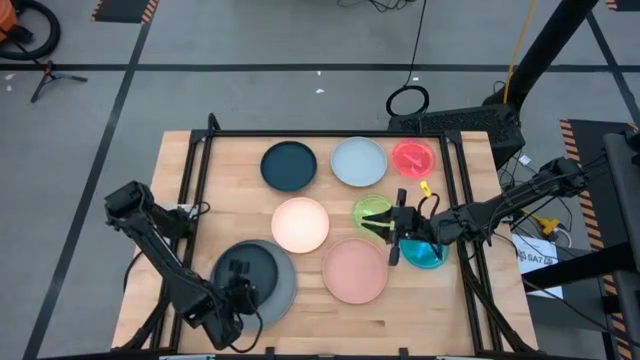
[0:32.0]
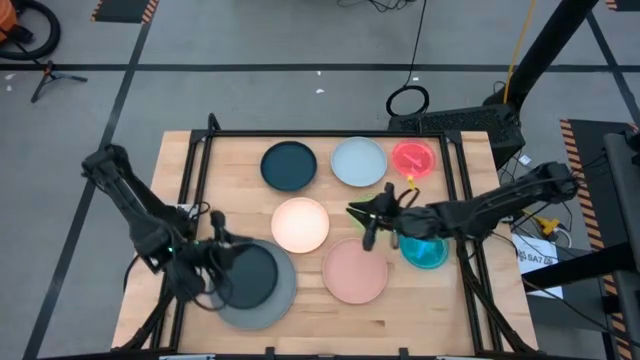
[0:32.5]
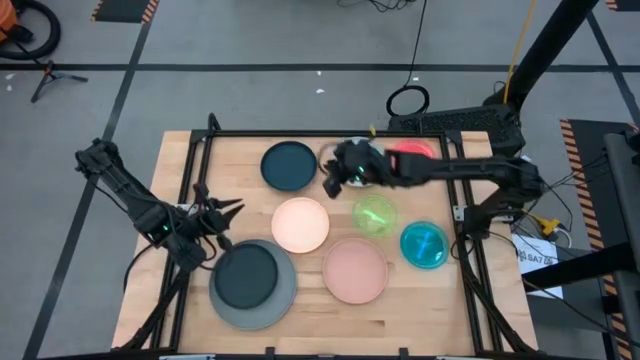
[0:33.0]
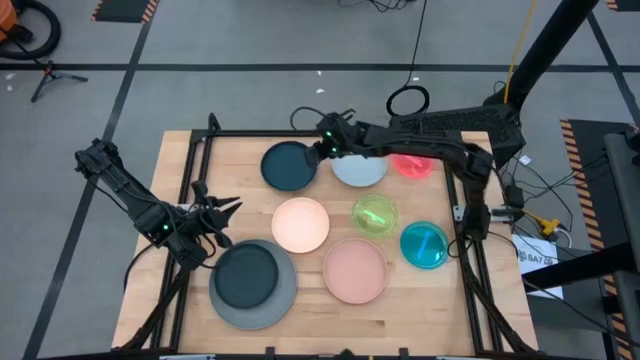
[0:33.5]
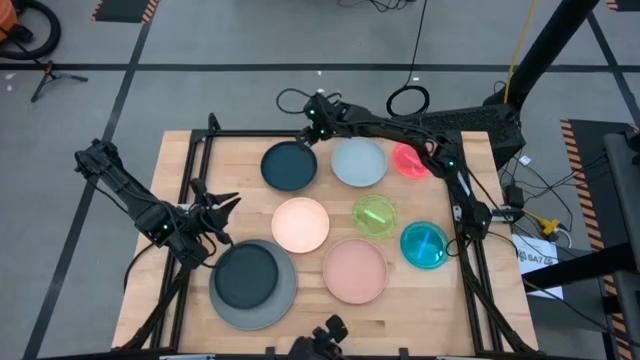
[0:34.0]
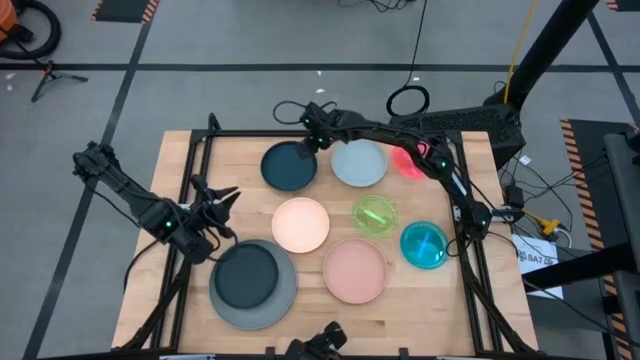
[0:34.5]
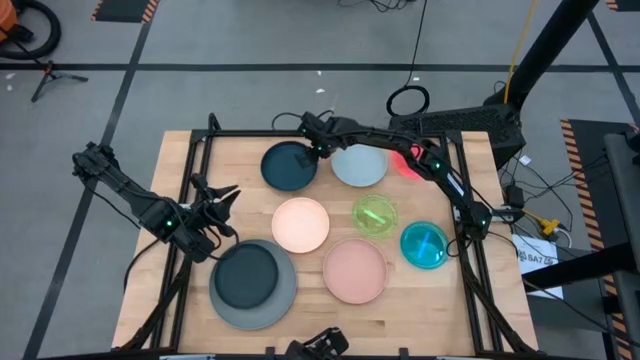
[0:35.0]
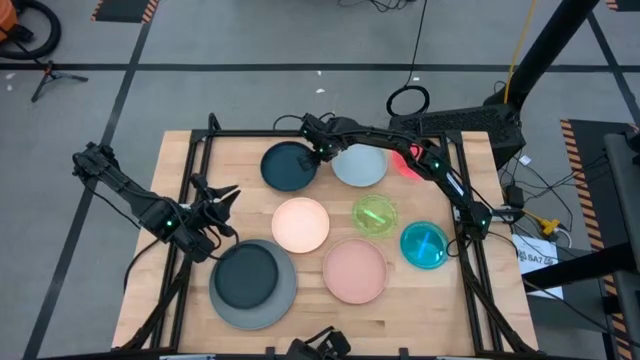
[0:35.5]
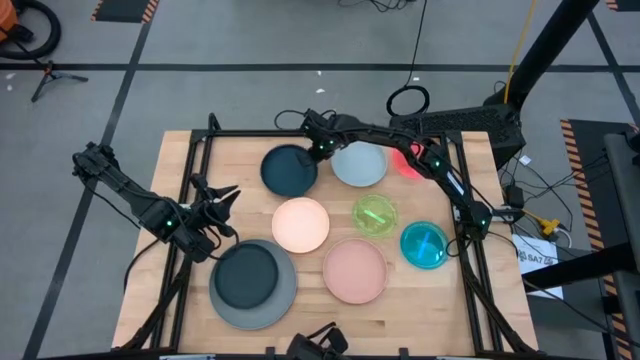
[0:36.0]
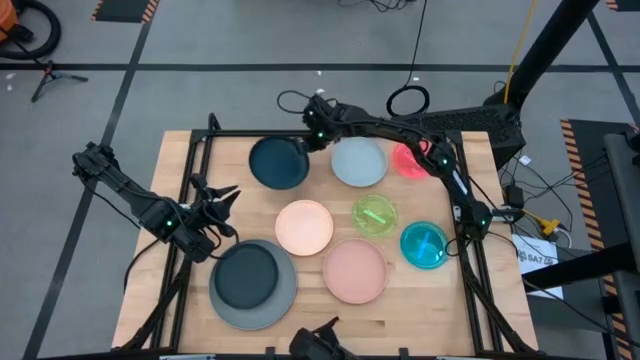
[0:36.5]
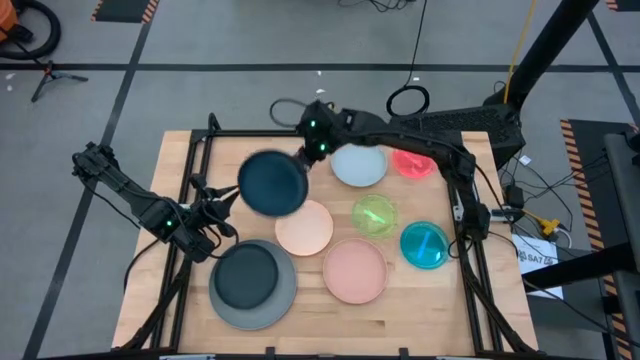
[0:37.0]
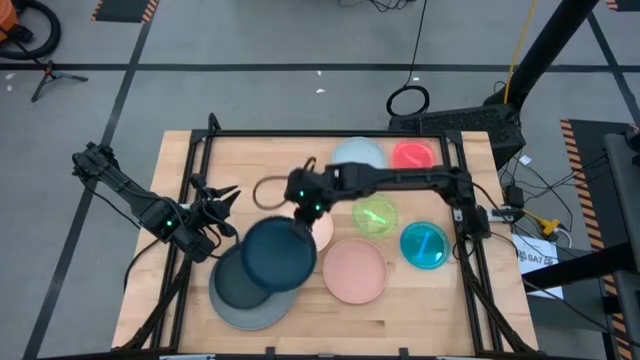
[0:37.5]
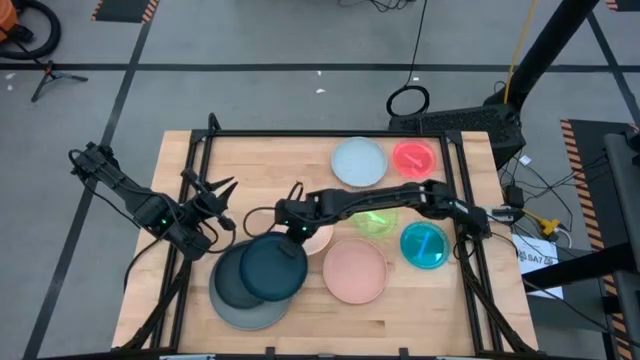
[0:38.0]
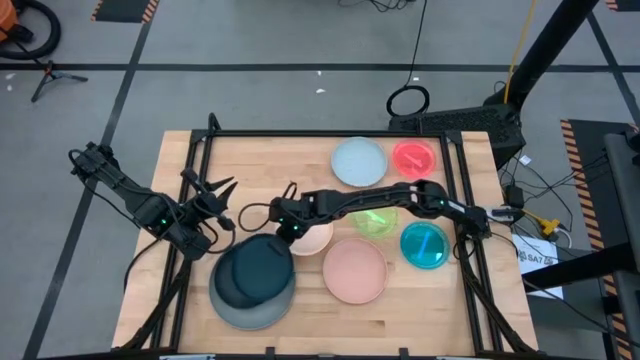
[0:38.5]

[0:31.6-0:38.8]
Task: Stack plastic plates
Stack the top blue plate on top of the bottom blue plate

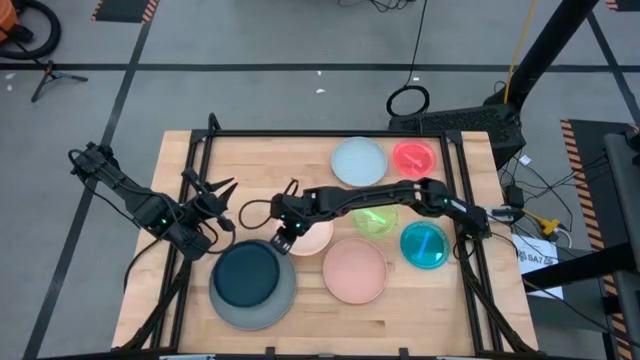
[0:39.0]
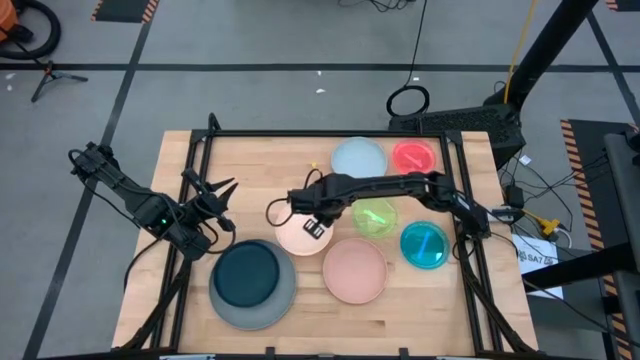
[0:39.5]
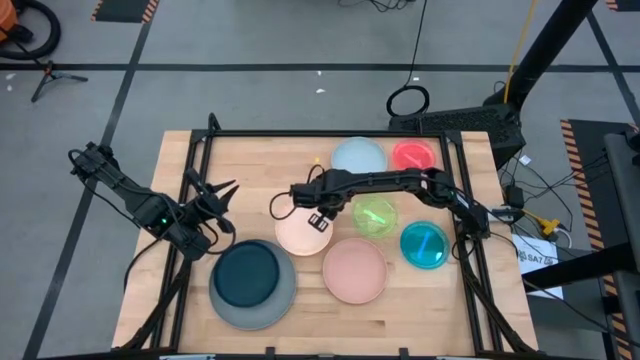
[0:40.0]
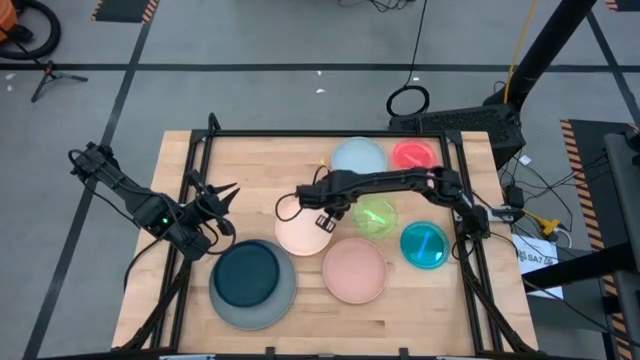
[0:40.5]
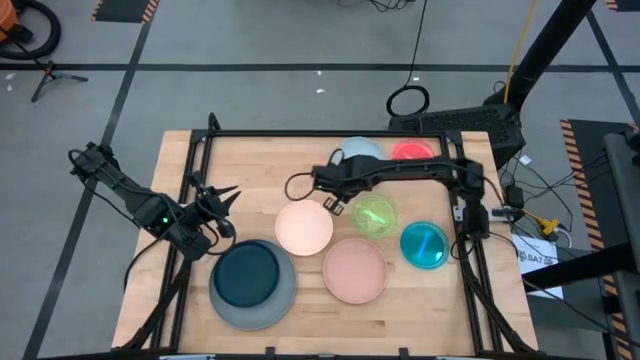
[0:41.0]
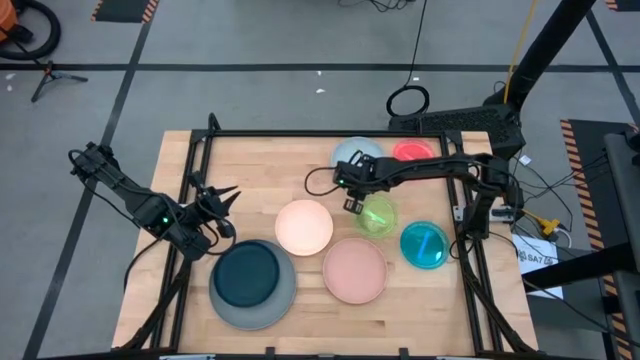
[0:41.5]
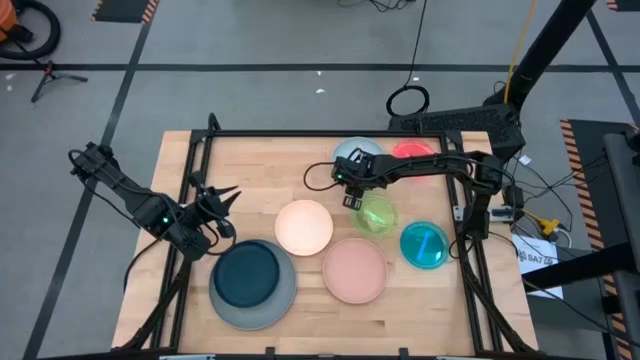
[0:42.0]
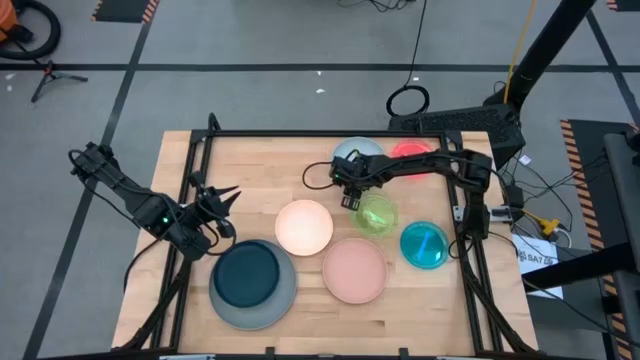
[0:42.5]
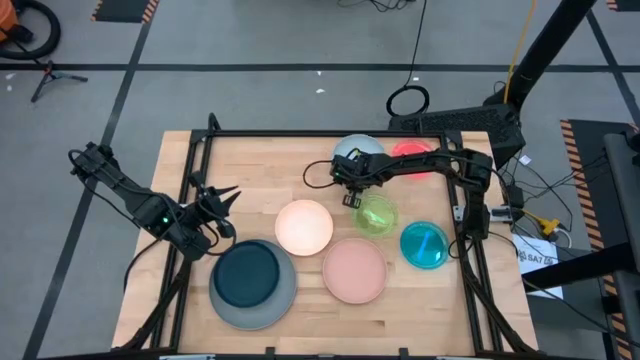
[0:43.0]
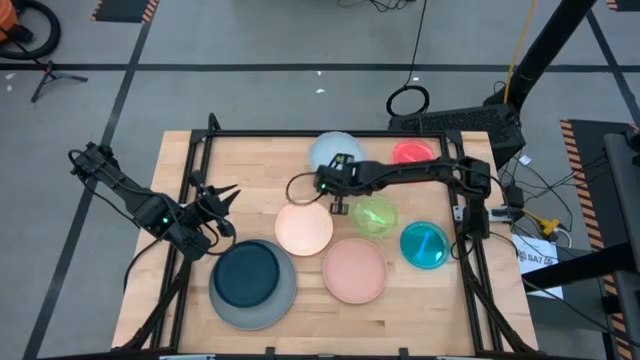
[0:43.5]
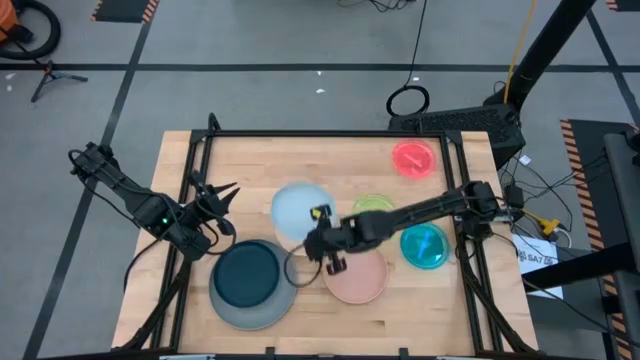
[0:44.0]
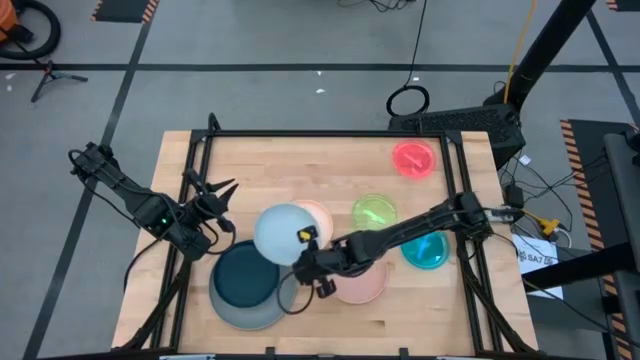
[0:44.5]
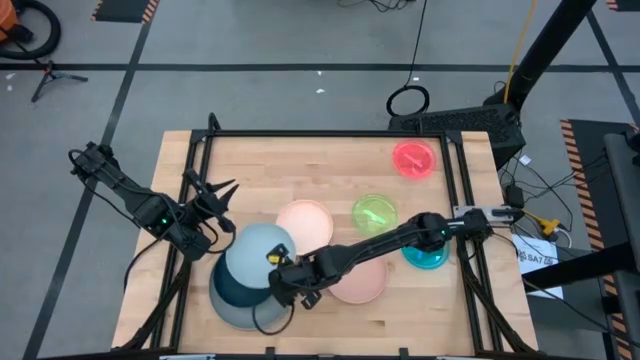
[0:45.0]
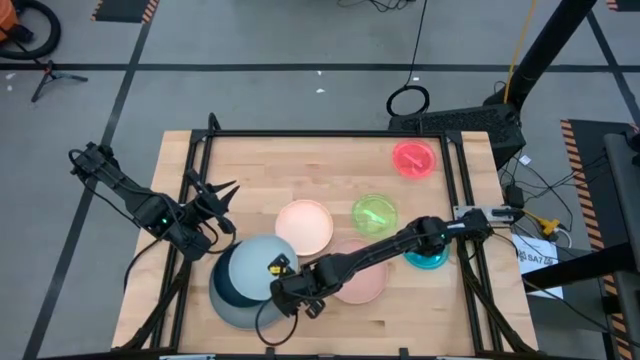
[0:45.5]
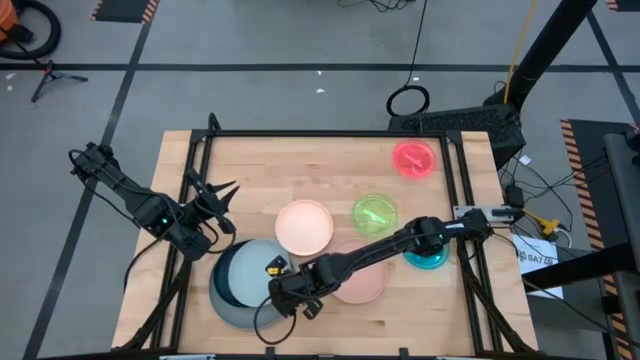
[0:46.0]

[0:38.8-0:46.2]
Stack the light blue plate on top of the blue plate

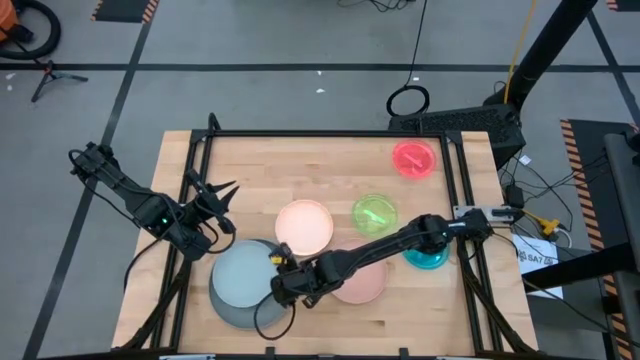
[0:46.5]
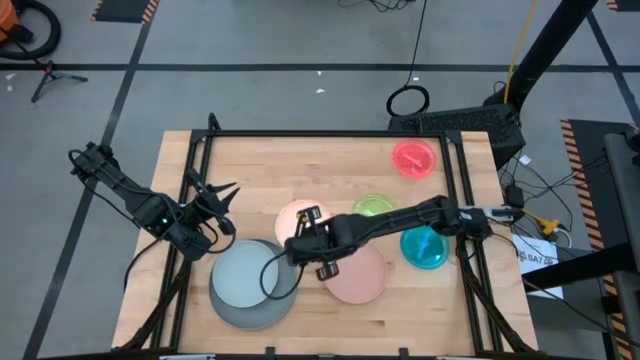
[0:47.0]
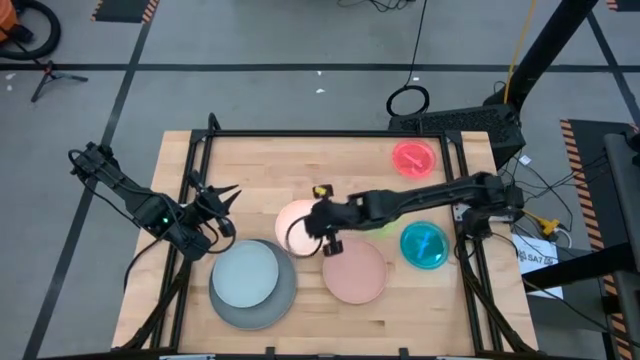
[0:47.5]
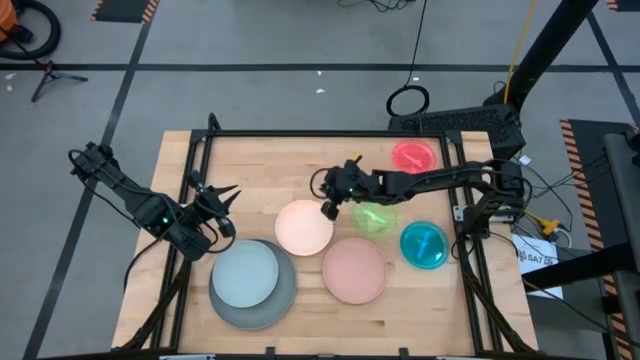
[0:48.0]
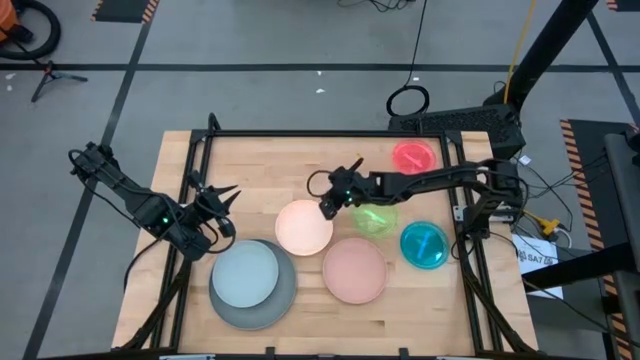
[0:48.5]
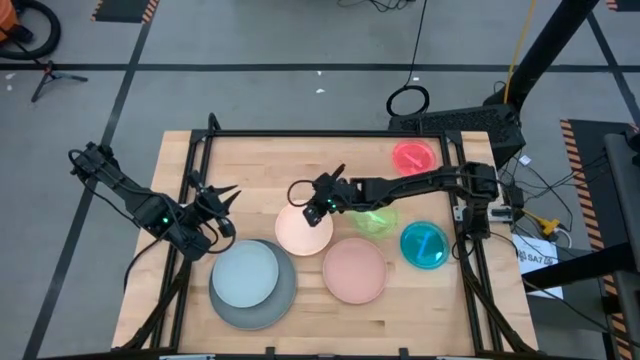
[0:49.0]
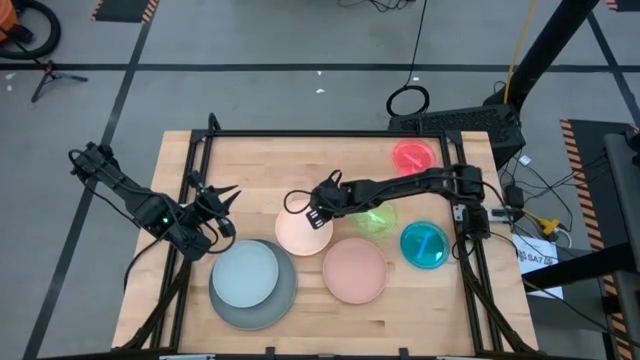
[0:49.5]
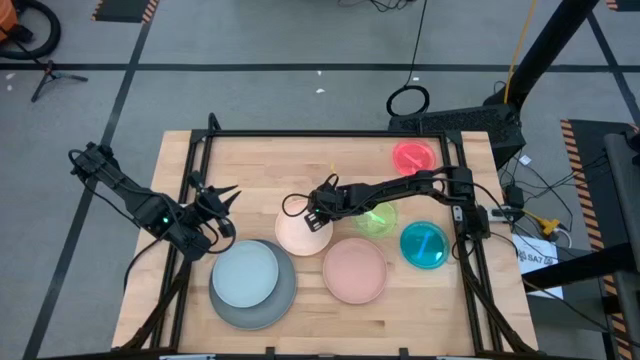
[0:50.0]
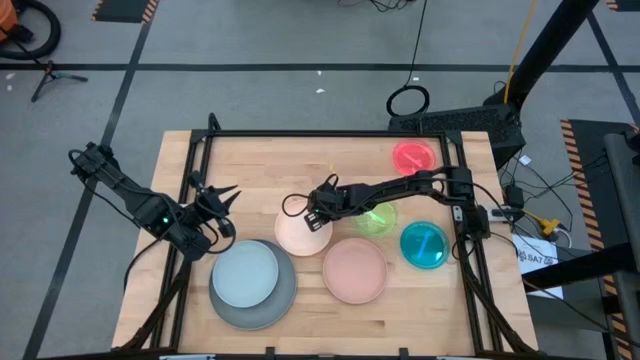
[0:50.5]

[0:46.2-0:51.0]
Stack the light pink plate on top of the light blue plate

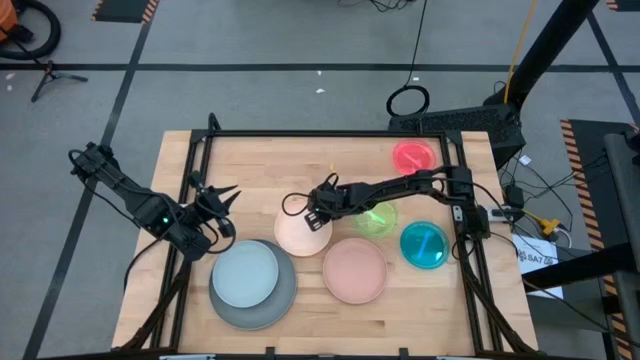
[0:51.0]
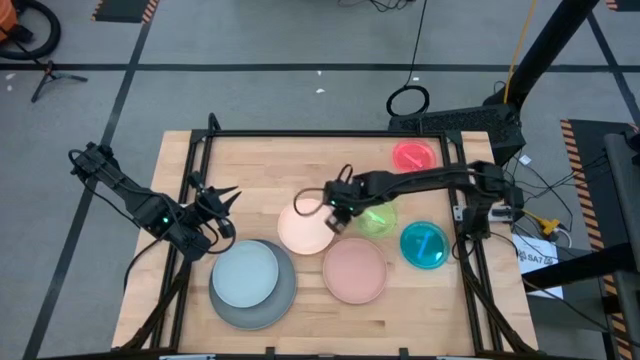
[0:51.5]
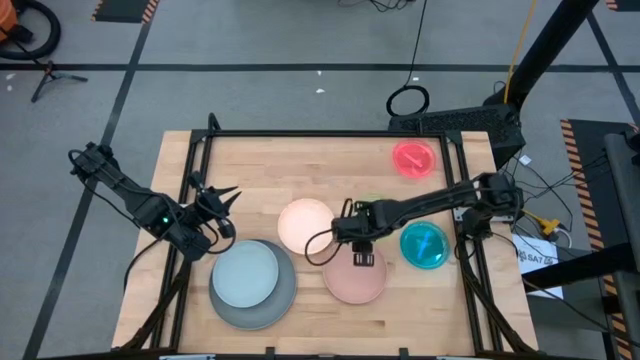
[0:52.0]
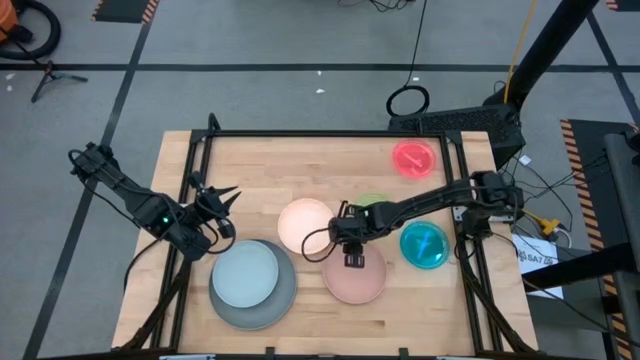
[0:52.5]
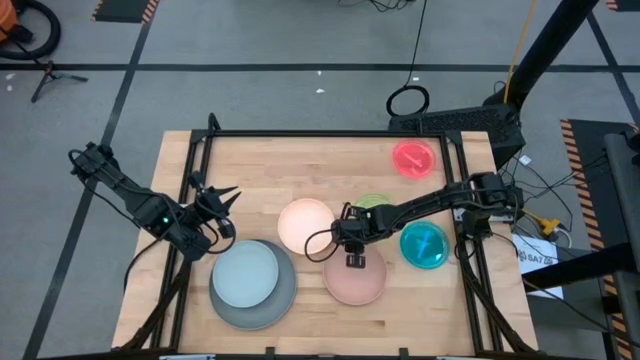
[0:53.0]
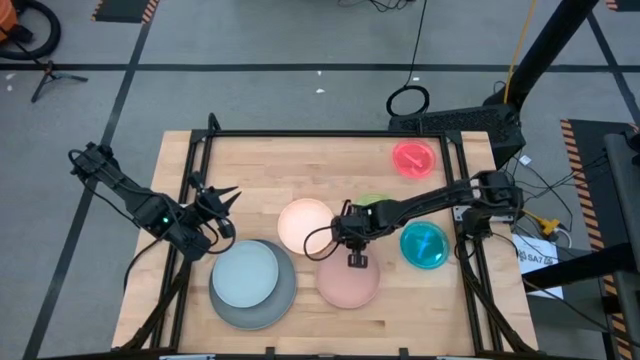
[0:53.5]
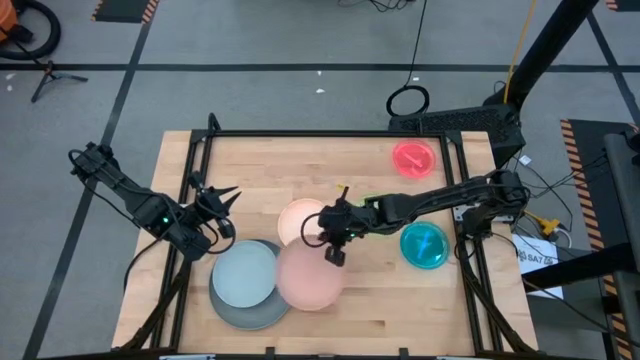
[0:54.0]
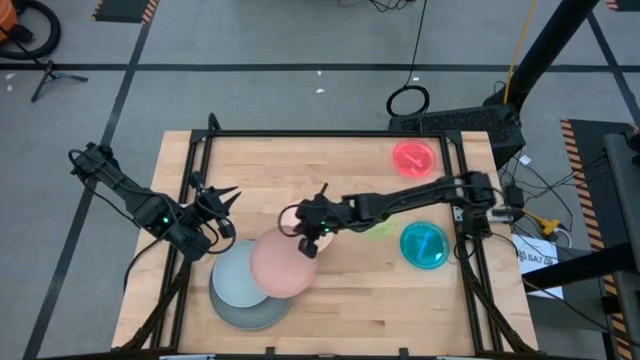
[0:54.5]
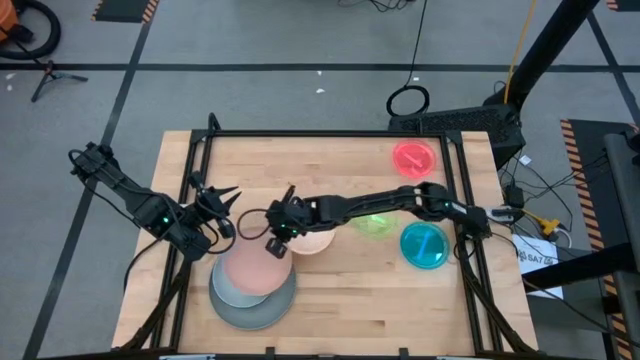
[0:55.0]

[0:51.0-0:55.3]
Stack the light pink plate on top of the light blue plate
